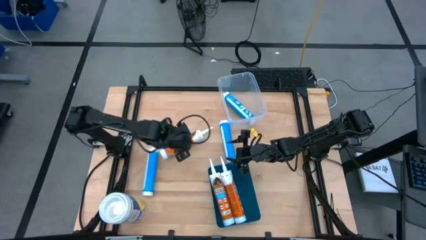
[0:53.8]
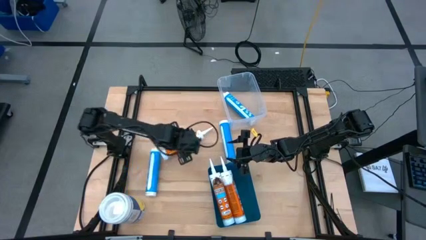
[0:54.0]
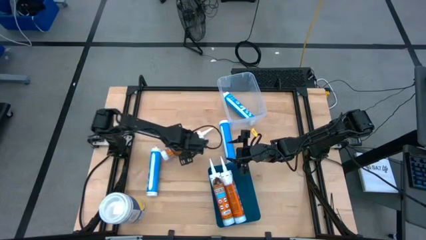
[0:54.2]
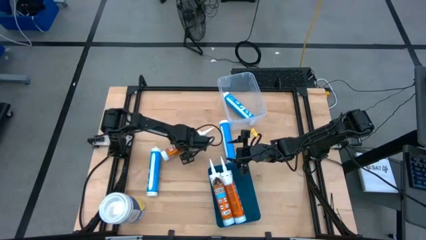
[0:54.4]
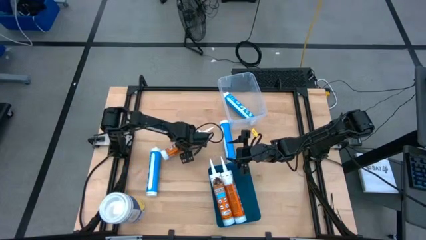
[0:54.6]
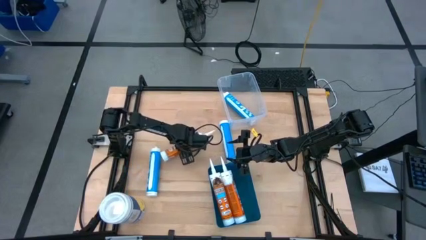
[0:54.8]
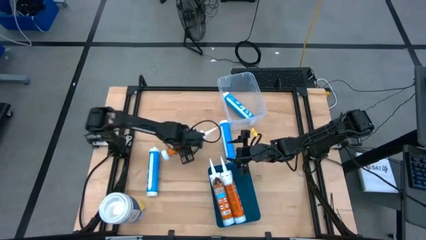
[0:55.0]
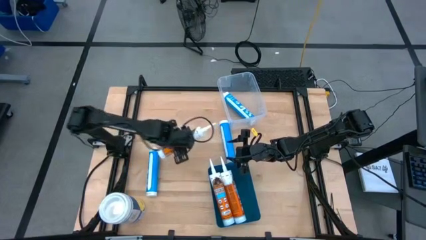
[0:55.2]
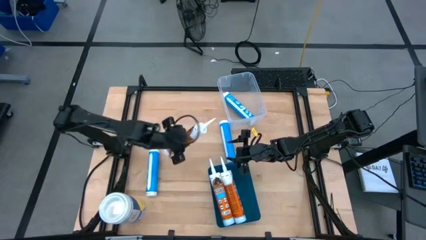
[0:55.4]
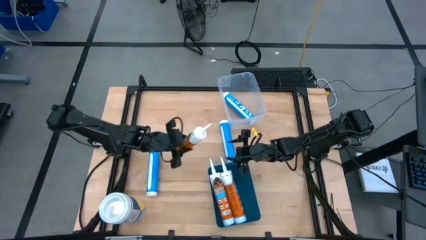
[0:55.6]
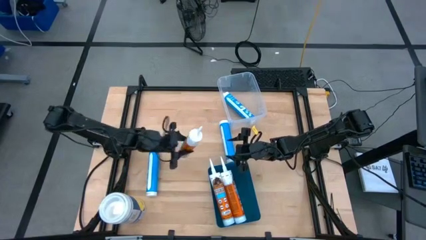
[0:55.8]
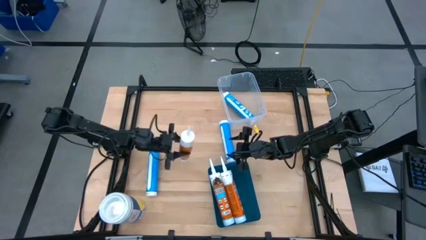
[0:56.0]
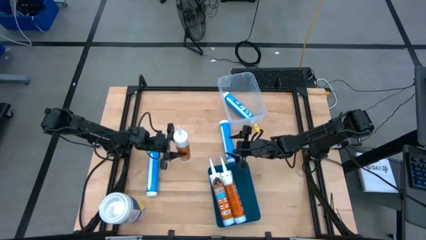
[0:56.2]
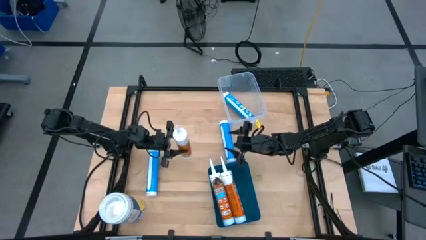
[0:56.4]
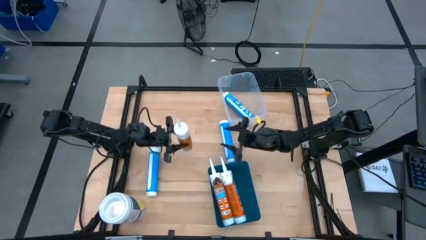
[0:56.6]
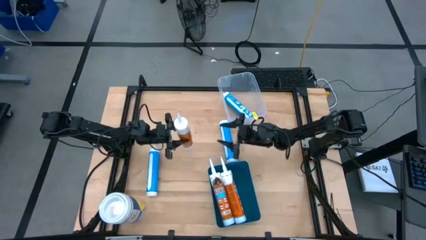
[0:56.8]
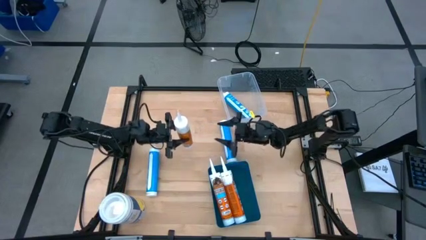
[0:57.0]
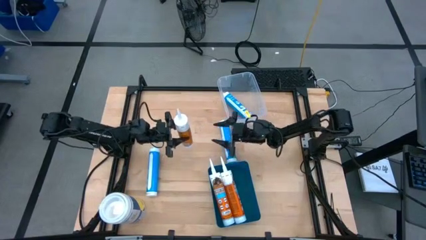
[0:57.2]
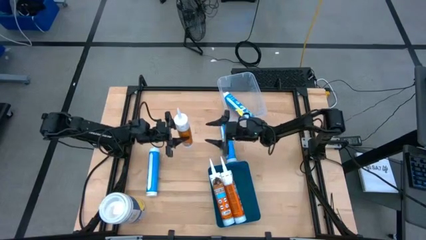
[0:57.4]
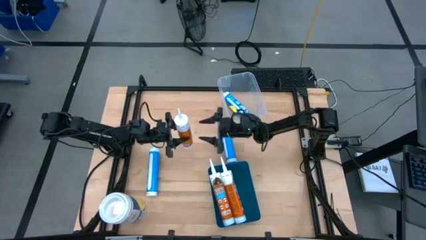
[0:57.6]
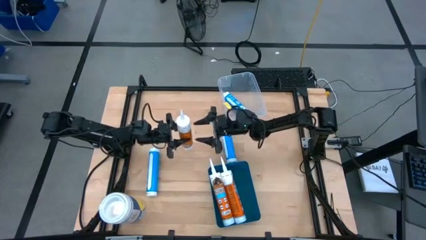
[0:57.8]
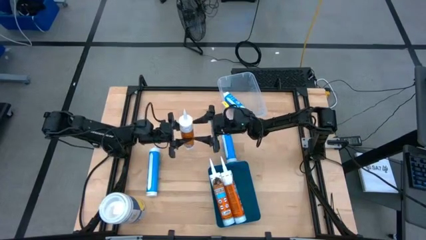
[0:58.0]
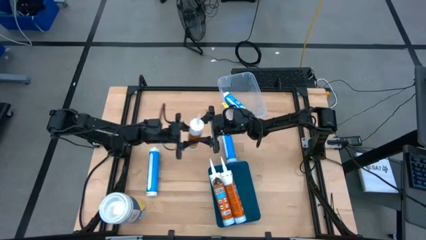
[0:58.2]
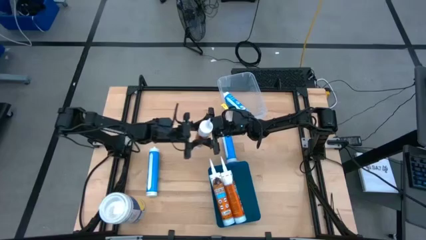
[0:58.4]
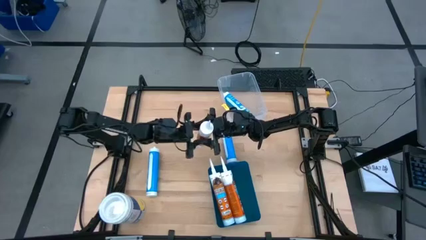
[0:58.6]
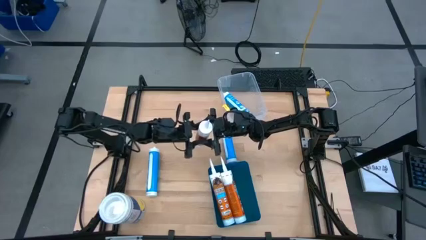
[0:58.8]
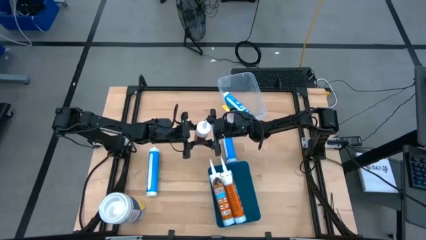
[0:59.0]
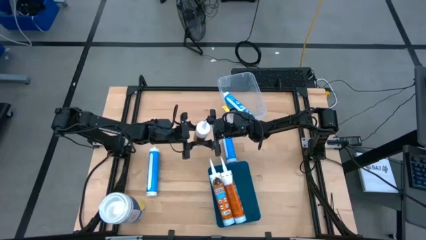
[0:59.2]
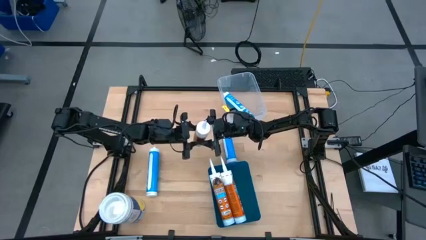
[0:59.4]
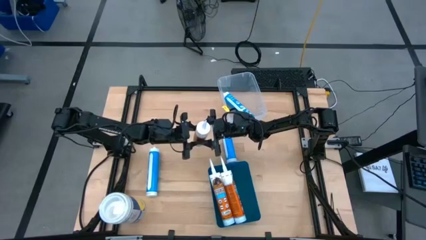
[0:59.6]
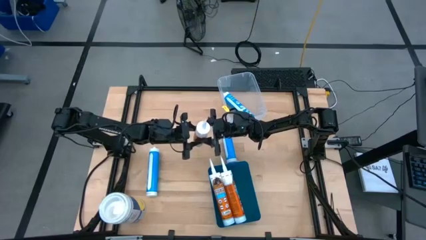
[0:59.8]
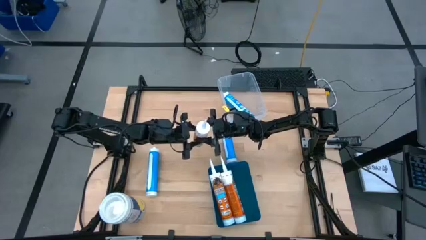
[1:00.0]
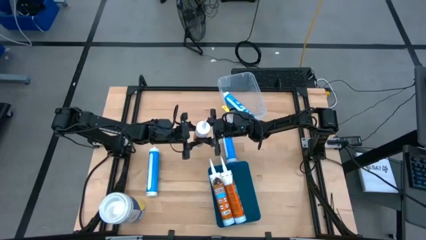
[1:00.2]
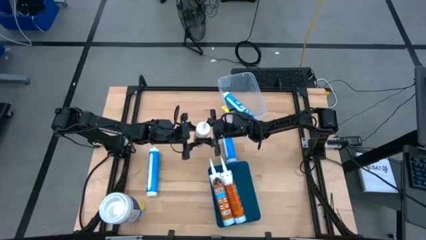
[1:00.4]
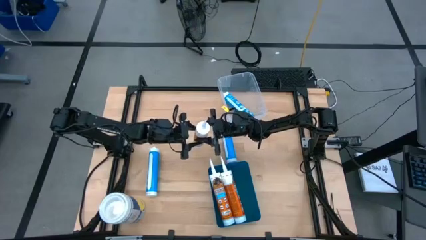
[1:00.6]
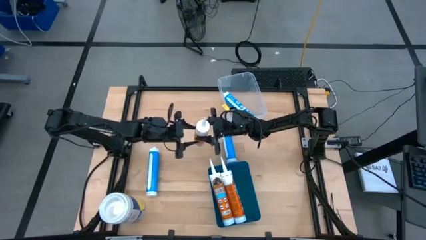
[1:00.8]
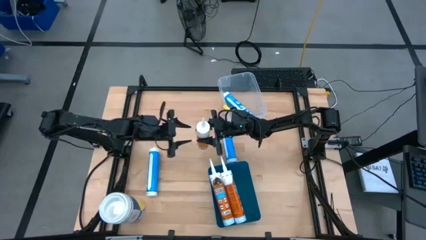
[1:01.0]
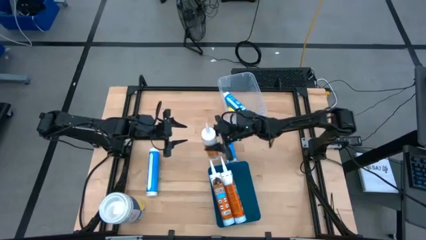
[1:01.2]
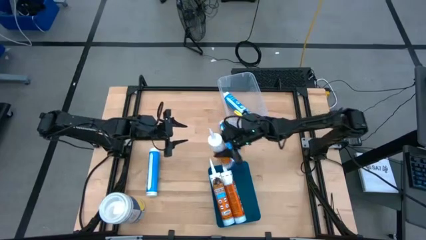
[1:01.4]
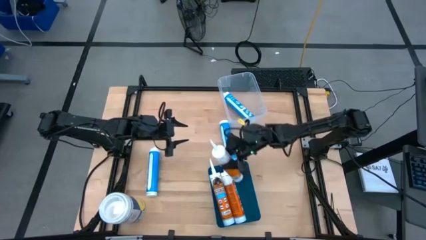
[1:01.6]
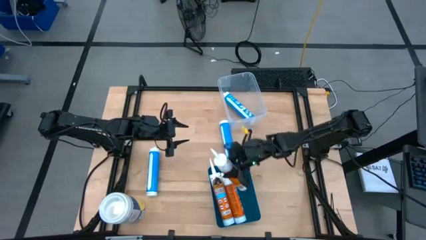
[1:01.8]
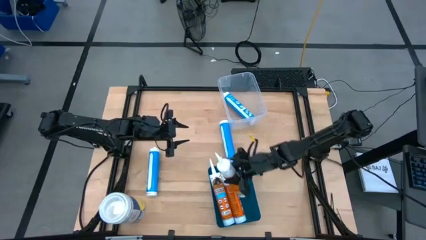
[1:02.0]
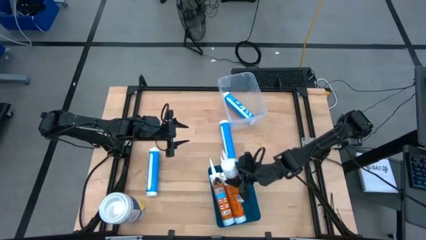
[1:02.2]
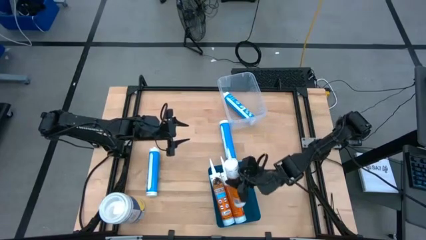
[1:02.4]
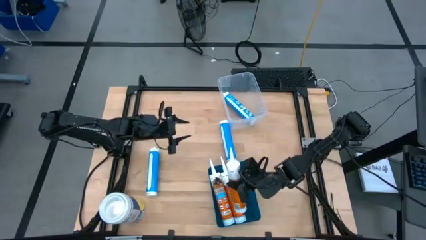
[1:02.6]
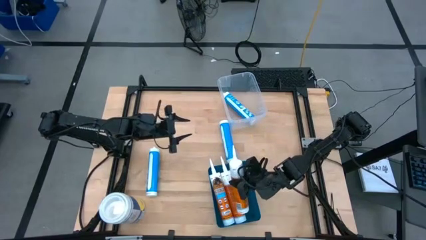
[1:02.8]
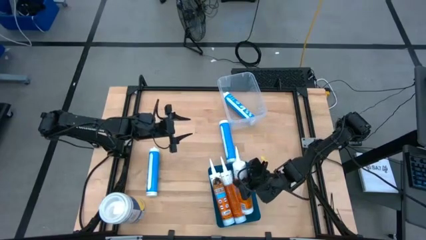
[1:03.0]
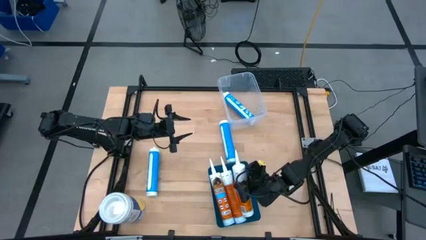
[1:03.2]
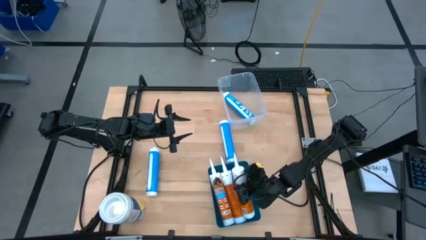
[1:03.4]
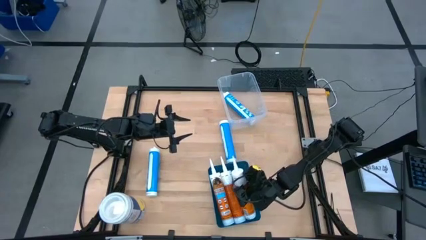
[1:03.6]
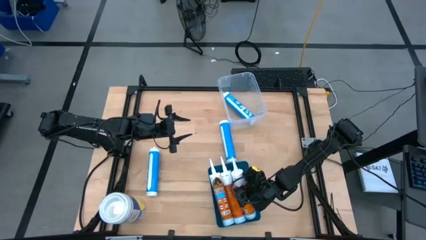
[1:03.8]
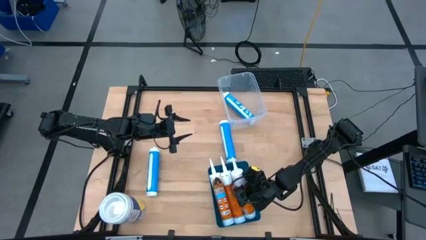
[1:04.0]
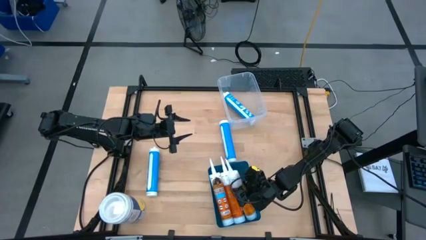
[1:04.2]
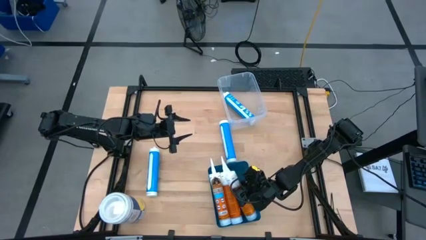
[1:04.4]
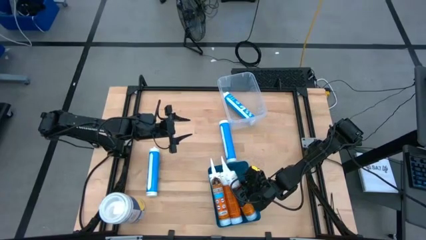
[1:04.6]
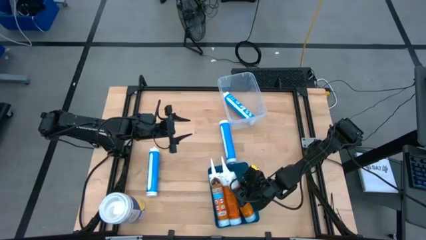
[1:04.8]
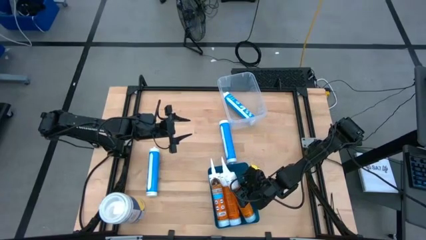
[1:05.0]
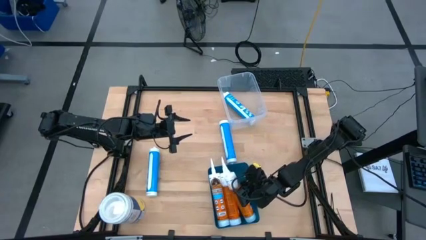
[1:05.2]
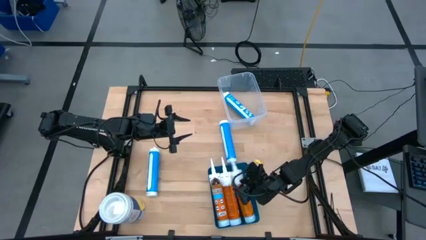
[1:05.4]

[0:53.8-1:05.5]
Task: Sort silicone sealant tubes
Put the orange sealant into the blue bin

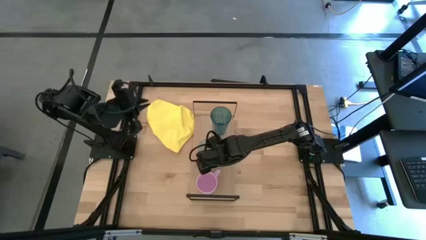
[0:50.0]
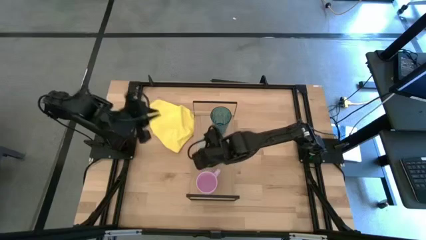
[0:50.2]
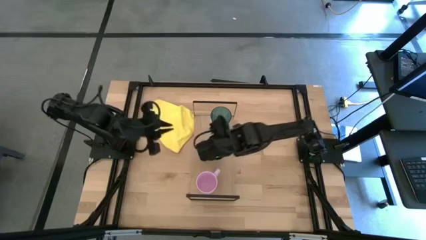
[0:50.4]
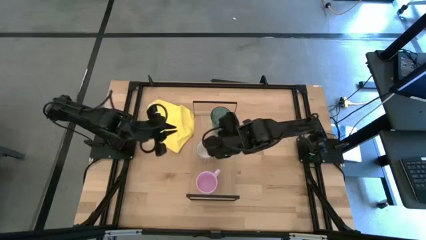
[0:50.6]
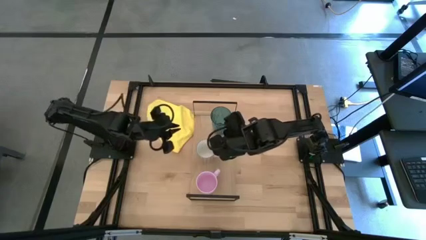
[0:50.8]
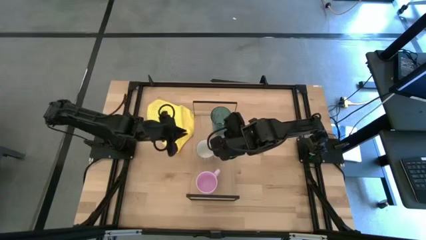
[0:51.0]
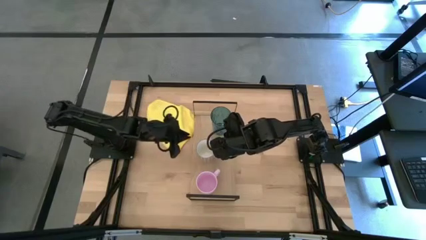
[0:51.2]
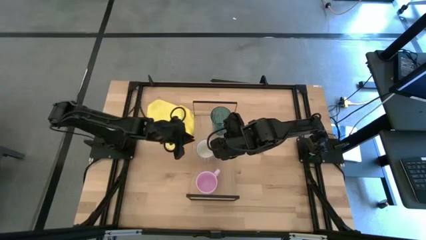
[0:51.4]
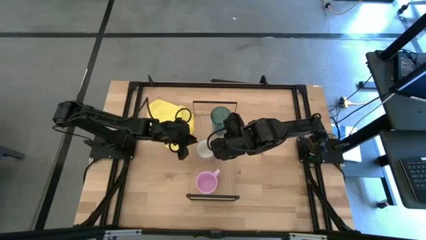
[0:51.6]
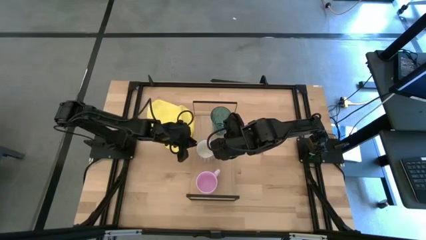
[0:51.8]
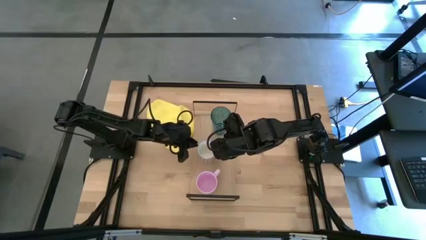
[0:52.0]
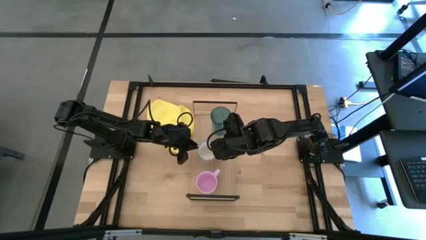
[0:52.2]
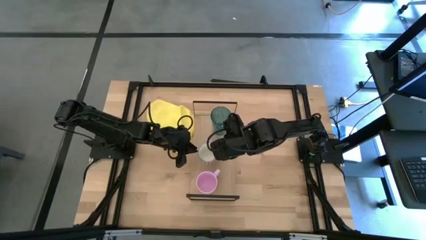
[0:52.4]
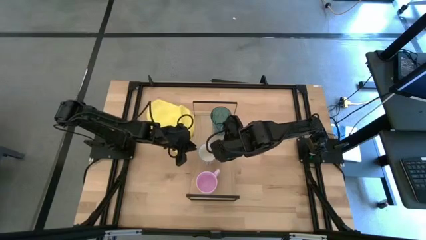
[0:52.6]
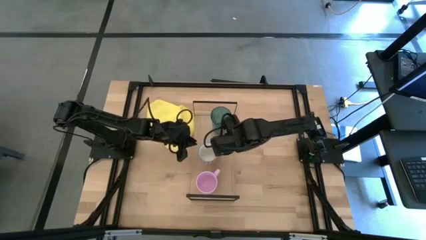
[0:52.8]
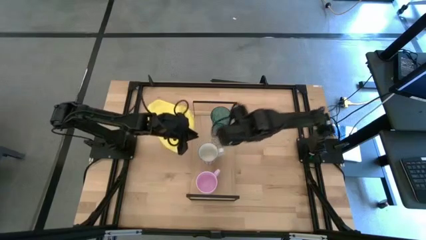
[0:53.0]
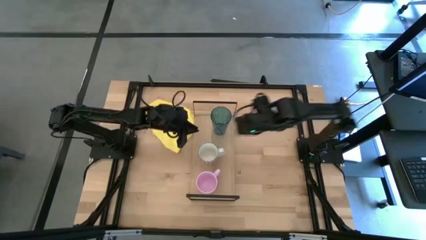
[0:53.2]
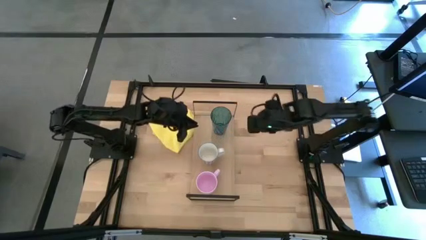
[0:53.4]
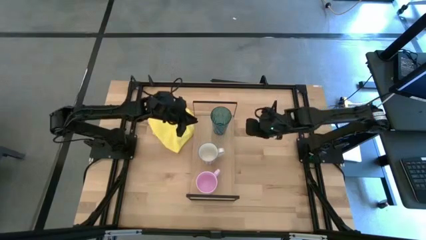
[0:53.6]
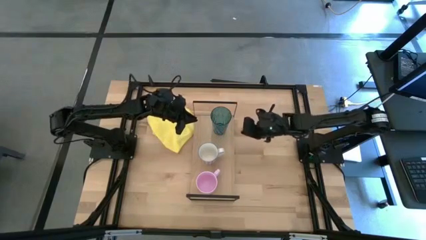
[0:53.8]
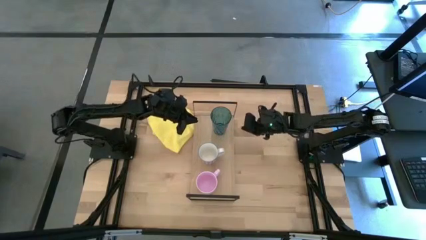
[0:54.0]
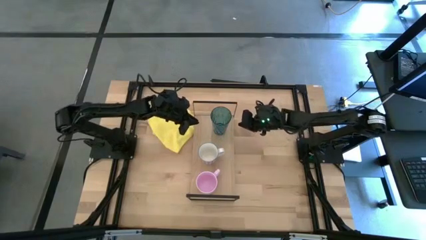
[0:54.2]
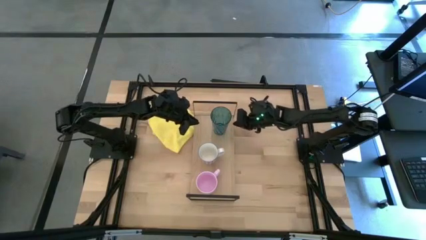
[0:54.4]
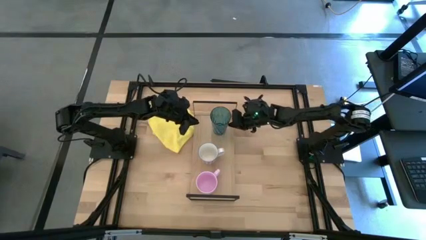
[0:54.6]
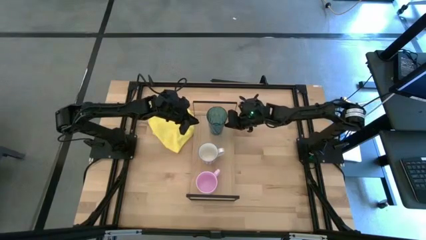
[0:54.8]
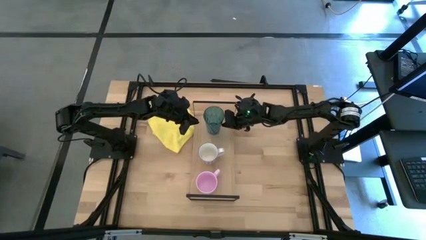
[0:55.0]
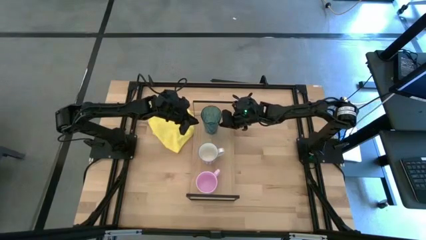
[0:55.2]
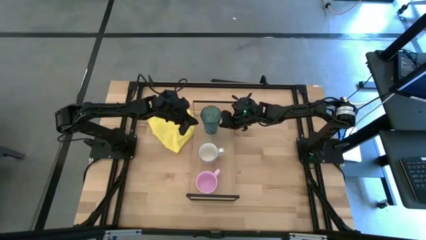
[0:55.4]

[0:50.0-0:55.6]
Task: Stack small to large cups/mugs on shelf
Adjust the cup and the mugs on the shelf
